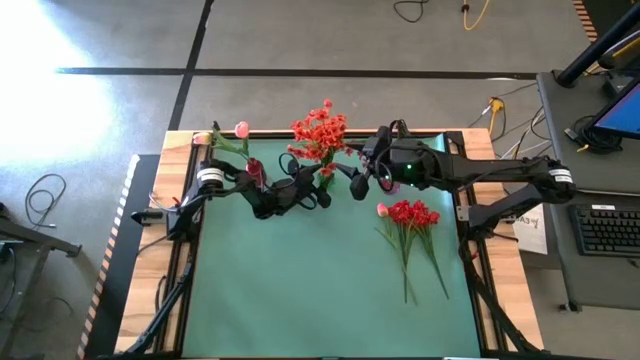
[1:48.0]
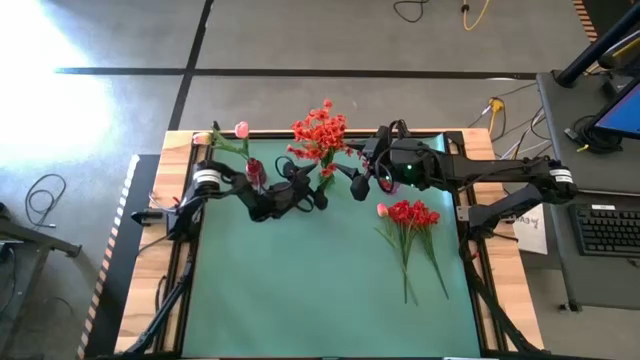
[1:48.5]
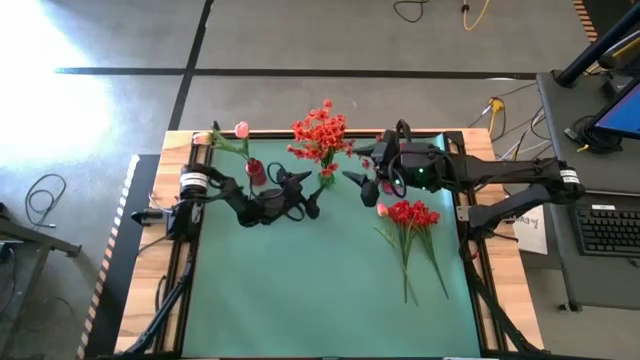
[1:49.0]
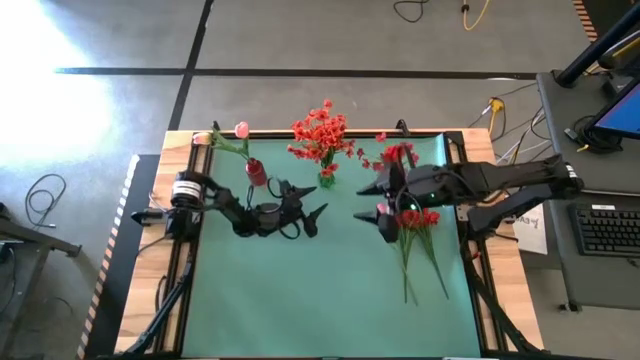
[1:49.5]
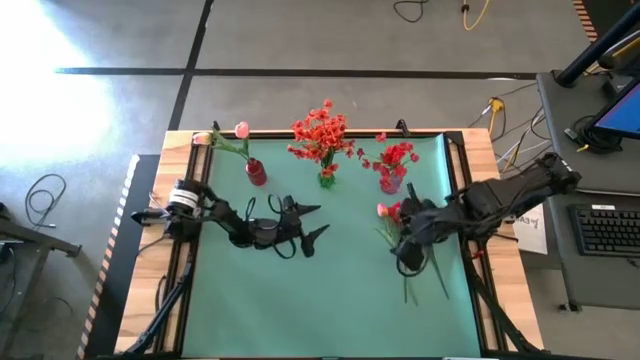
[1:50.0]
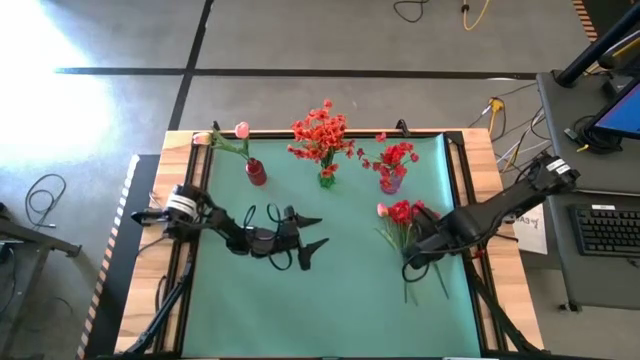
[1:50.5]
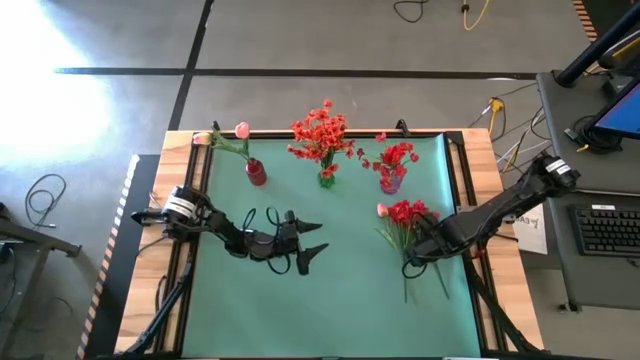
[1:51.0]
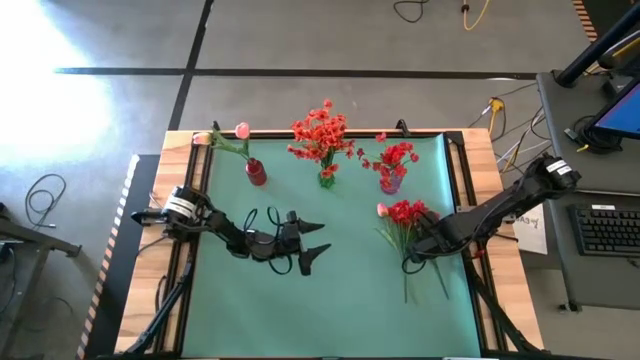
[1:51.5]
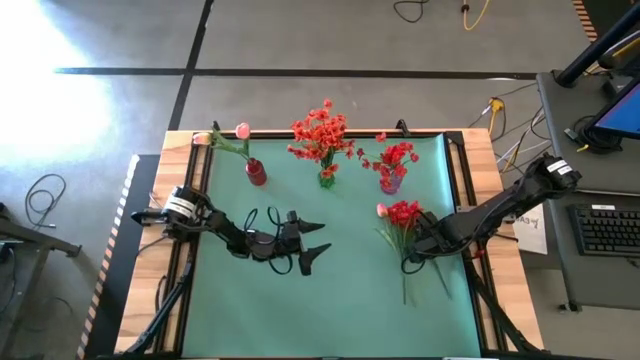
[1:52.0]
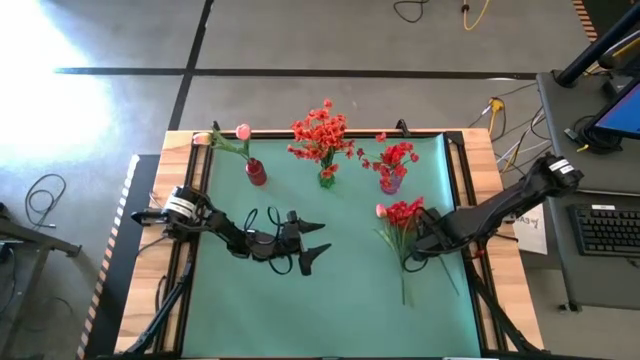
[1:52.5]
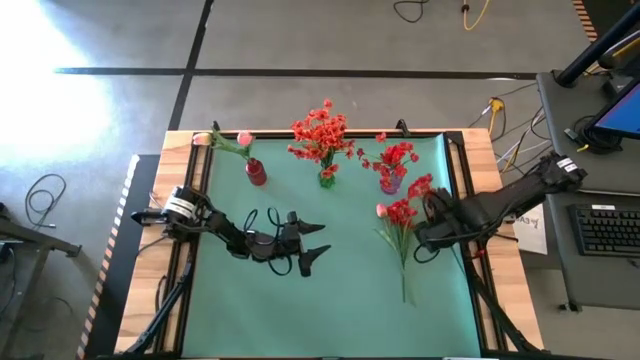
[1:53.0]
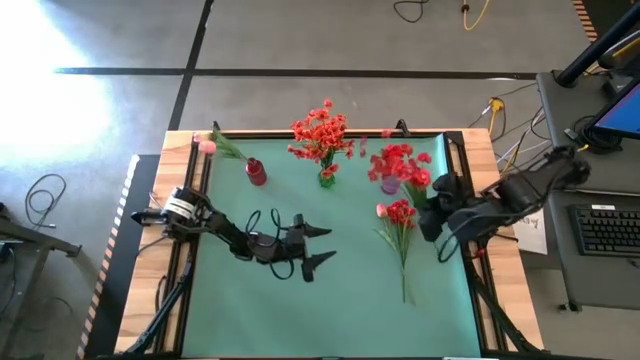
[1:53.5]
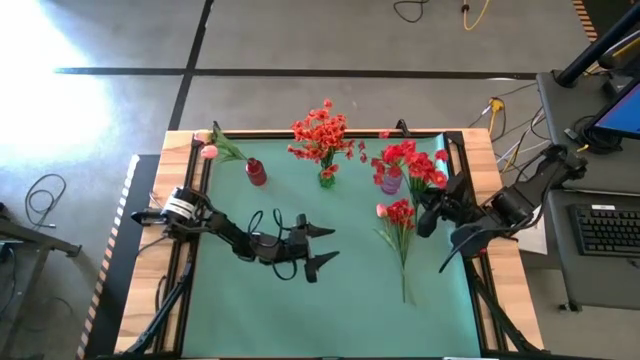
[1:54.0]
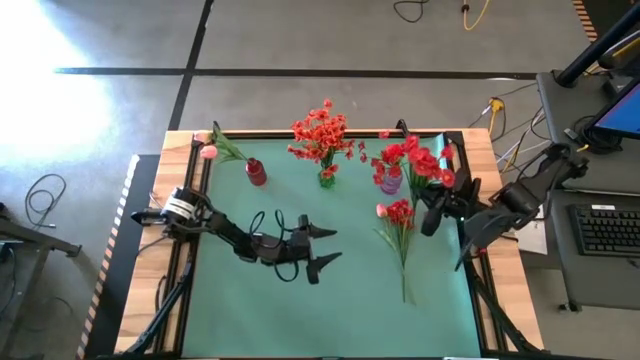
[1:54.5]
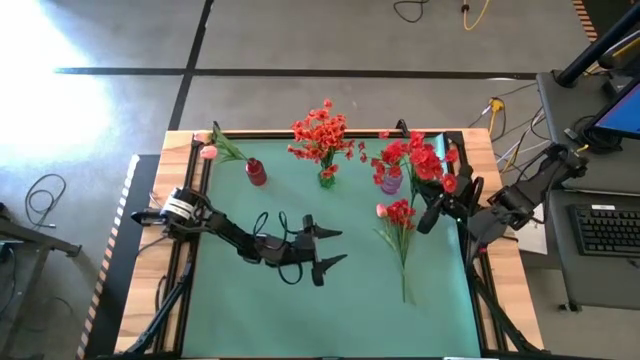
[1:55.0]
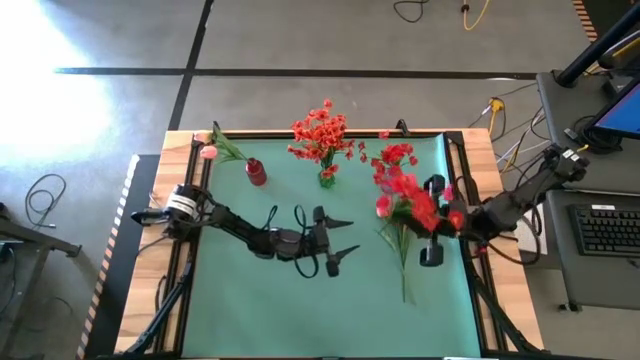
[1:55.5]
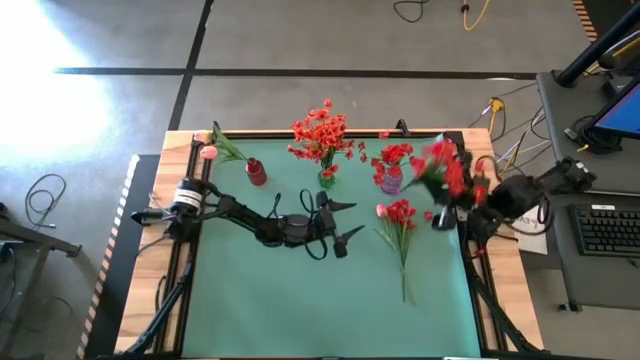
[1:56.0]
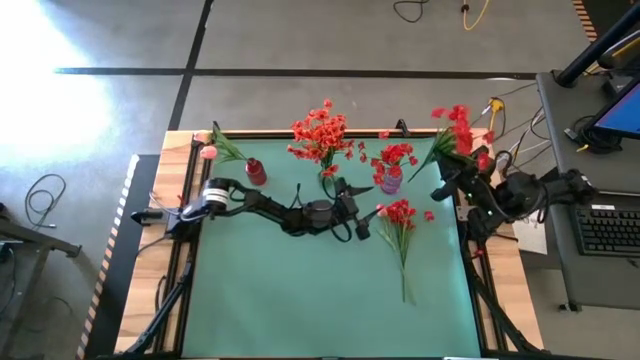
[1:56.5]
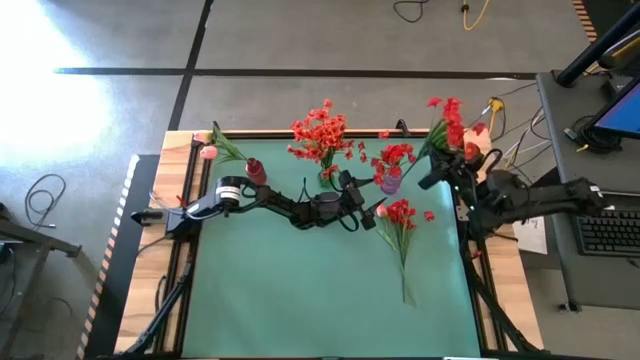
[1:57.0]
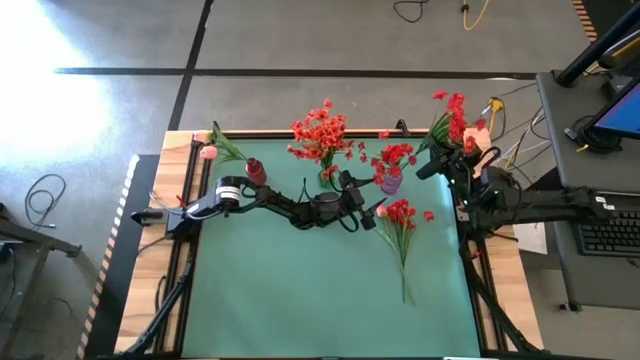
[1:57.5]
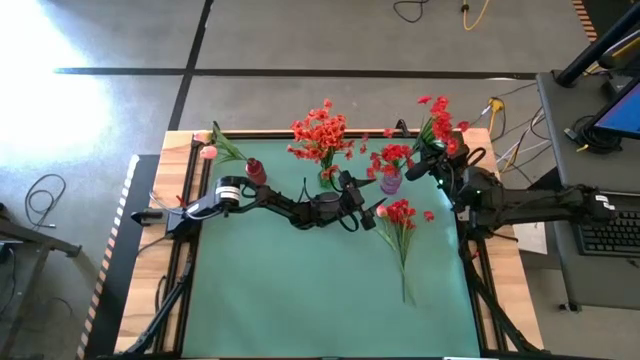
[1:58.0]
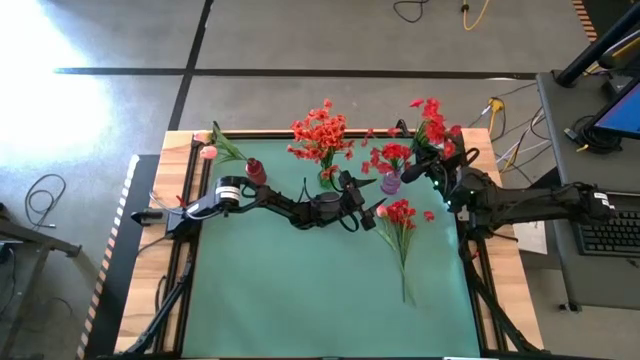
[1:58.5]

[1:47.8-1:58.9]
Task: Sort flowers into vase by color
Put the middle right red flower in the violet flower vase

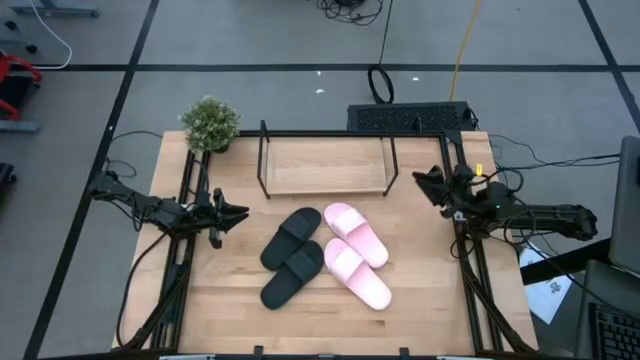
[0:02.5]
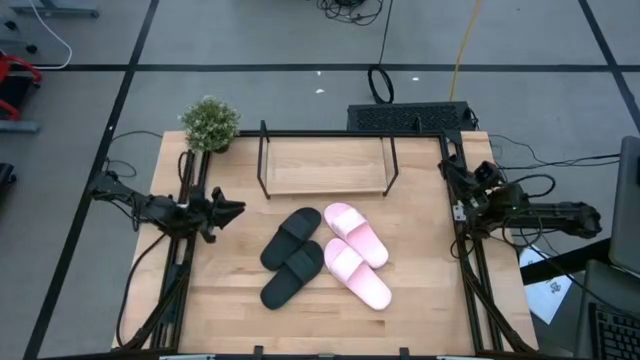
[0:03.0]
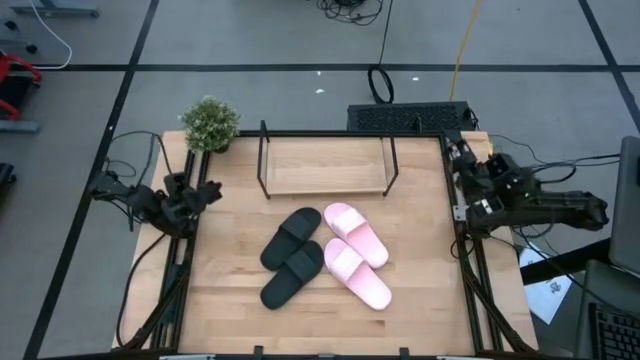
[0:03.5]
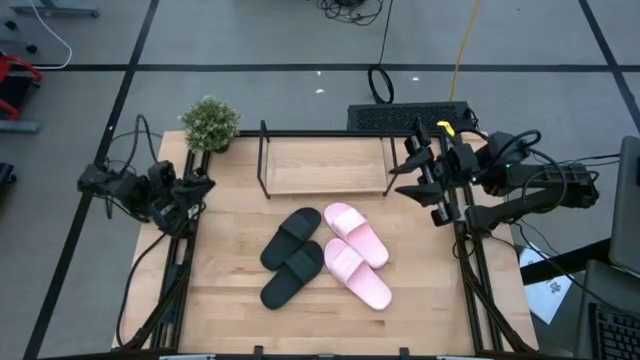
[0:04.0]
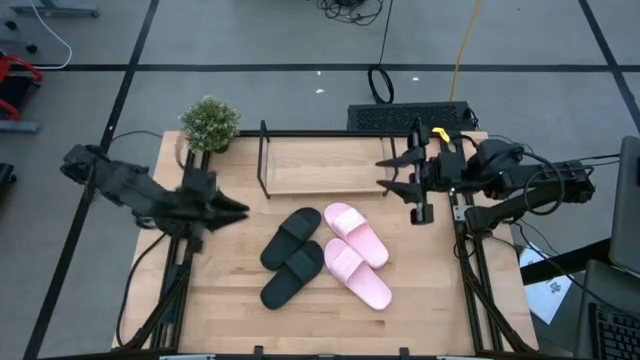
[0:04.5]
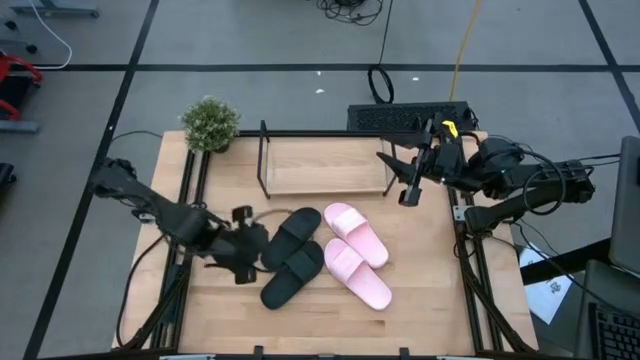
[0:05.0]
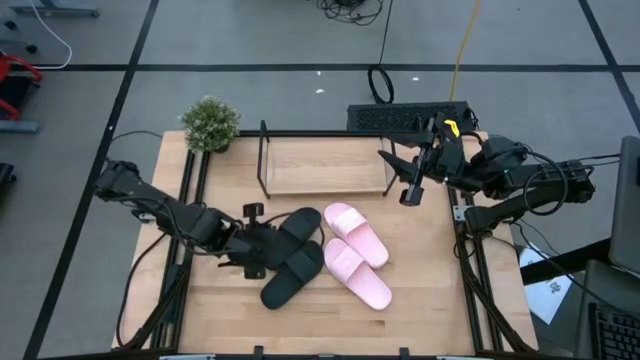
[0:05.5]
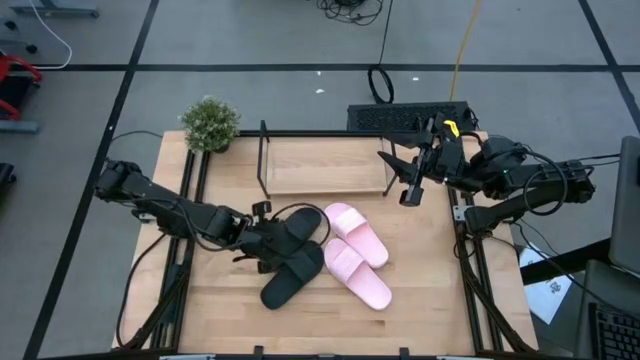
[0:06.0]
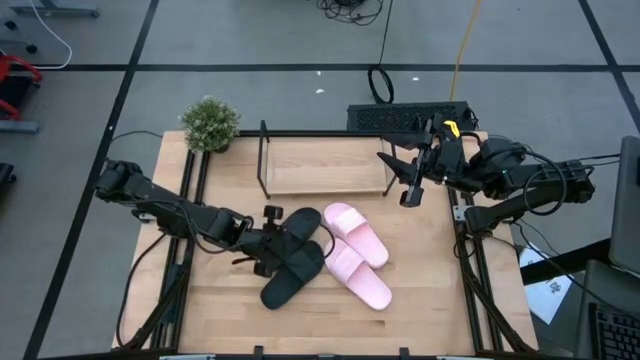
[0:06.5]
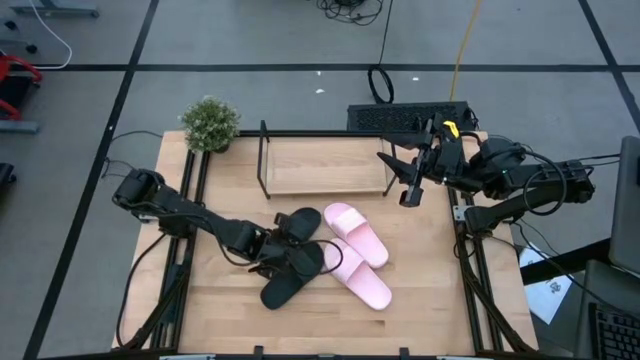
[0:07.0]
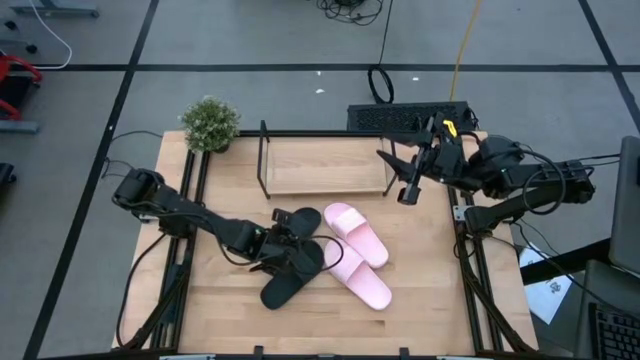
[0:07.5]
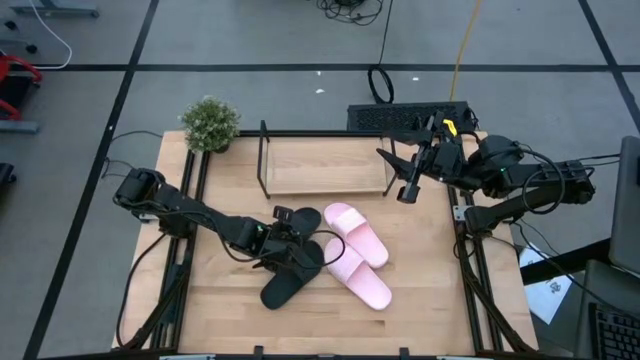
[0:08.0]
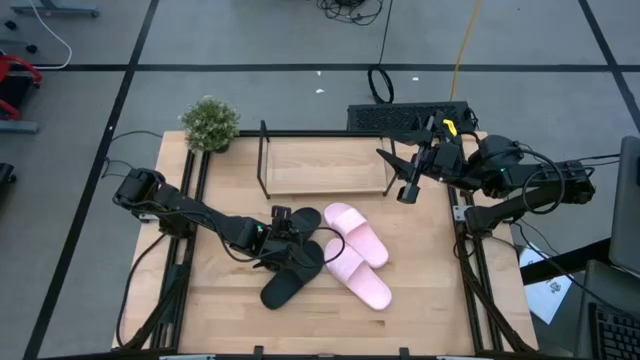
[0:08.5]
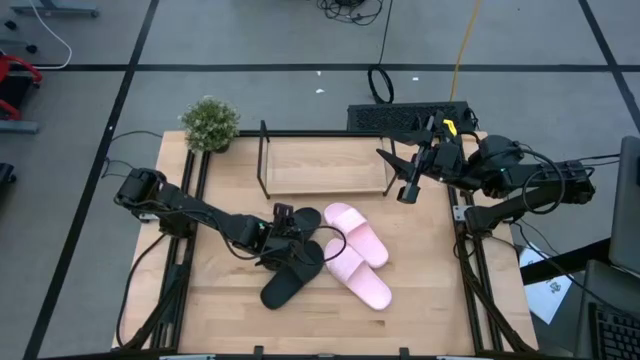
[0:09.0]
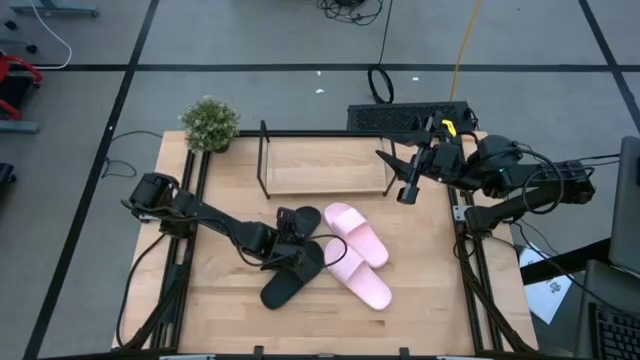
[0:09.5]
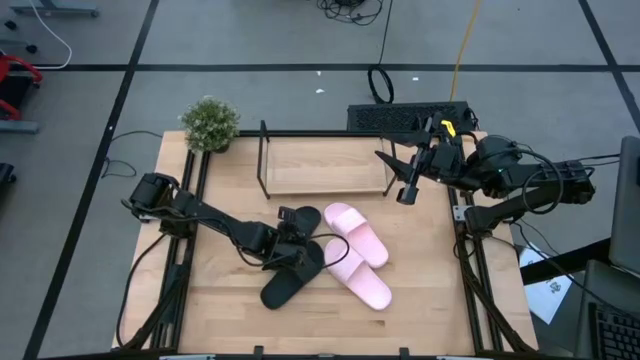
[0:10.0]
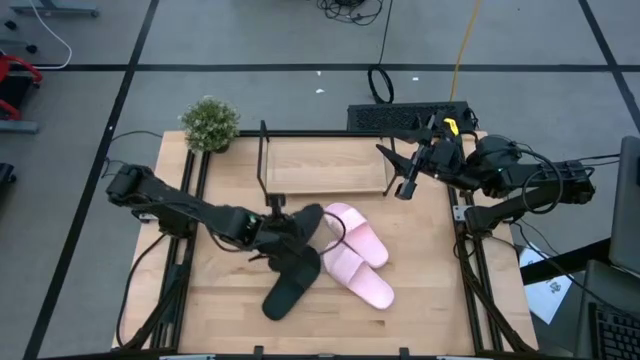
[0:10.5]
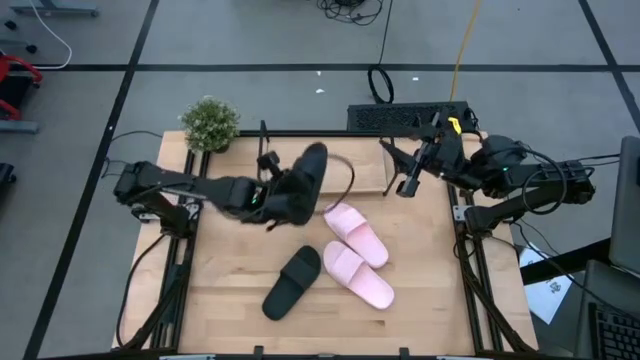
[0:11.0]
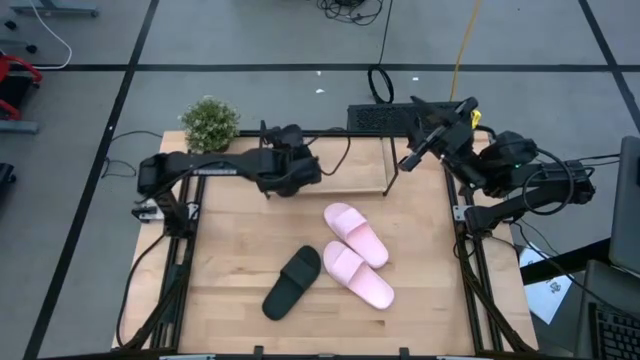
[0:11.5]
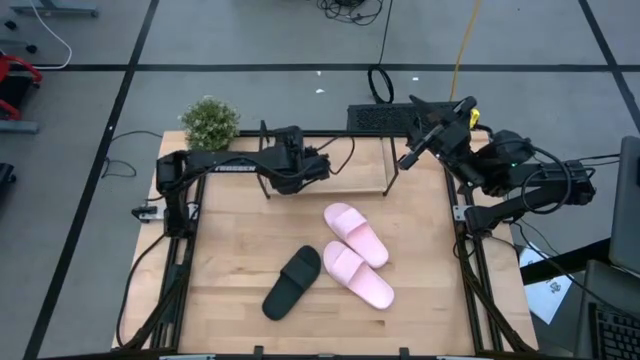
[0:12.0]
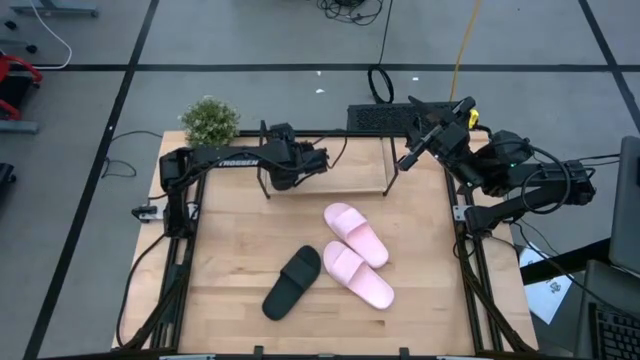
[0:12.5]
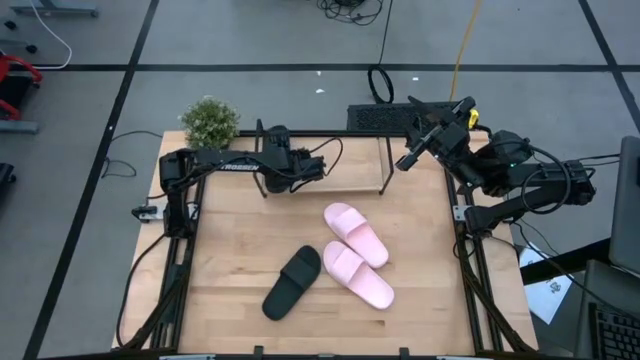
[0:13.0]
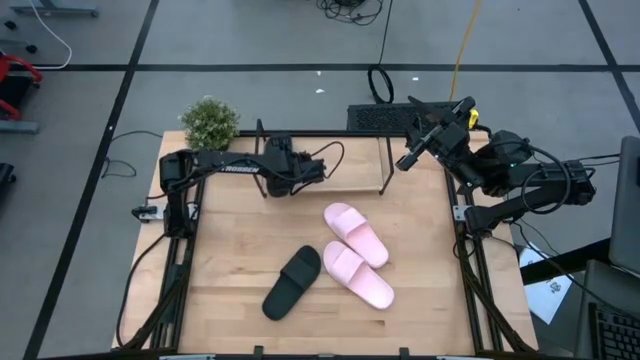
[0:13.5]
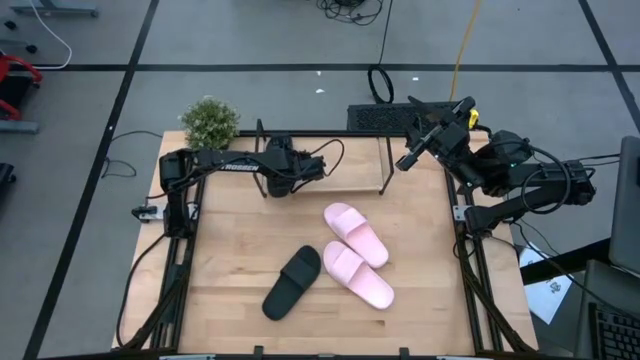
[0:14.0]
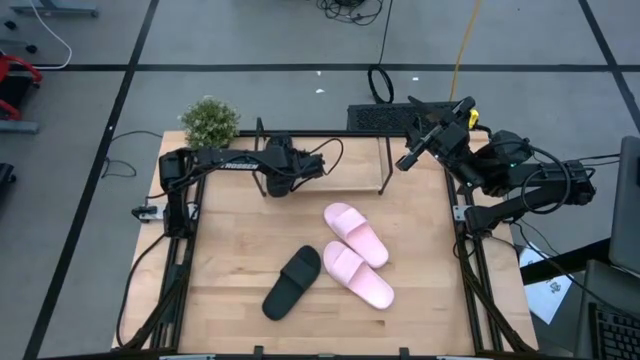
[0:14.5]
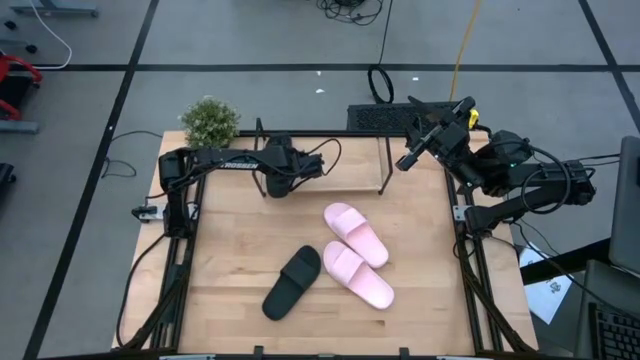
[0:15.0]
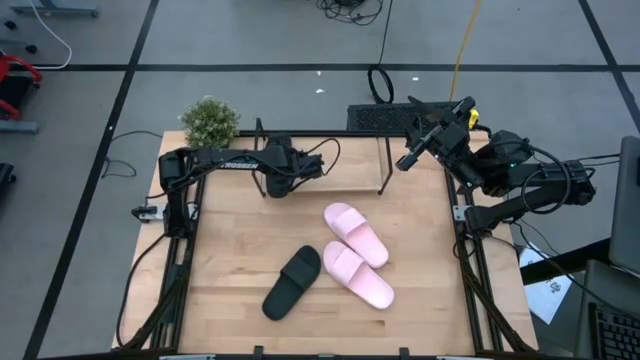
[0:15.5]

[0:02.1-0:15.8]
Task: Pick and place slides into the shelf
Put the top black slipper on the shelf
